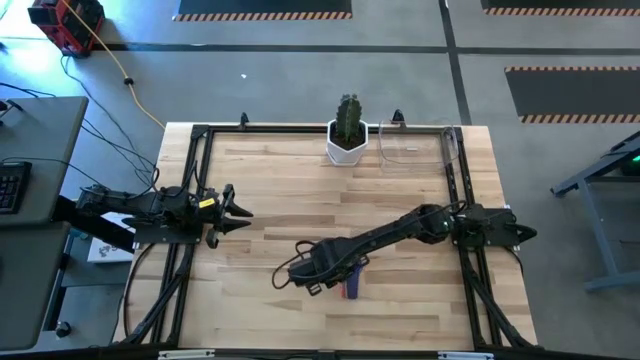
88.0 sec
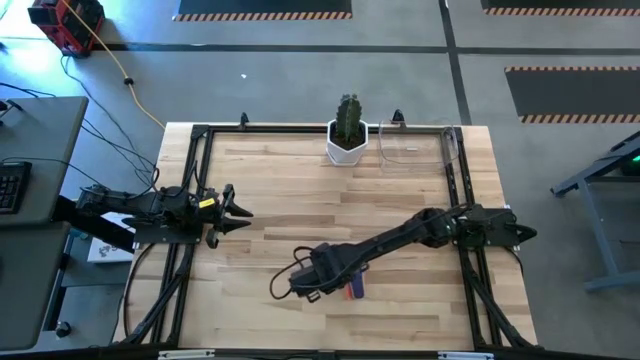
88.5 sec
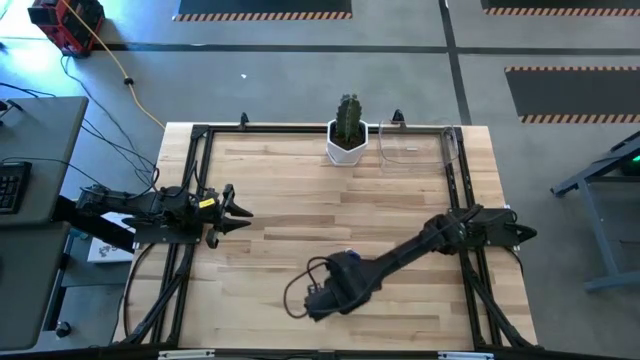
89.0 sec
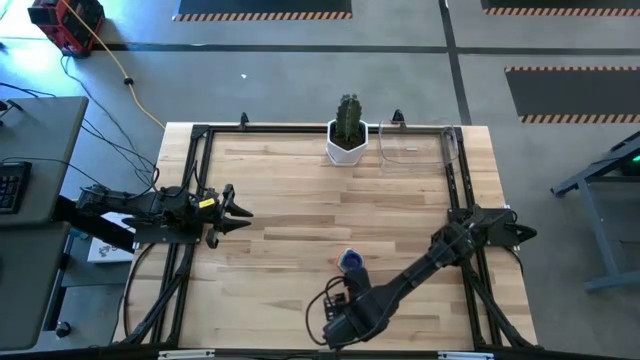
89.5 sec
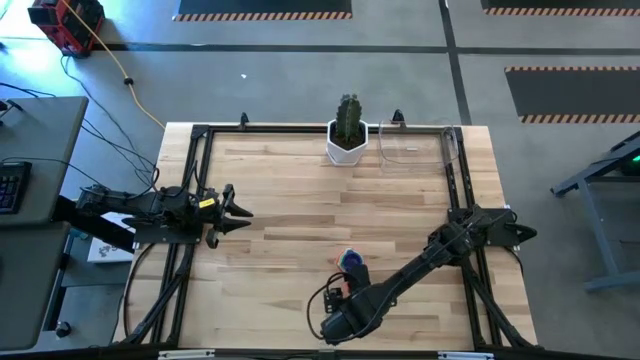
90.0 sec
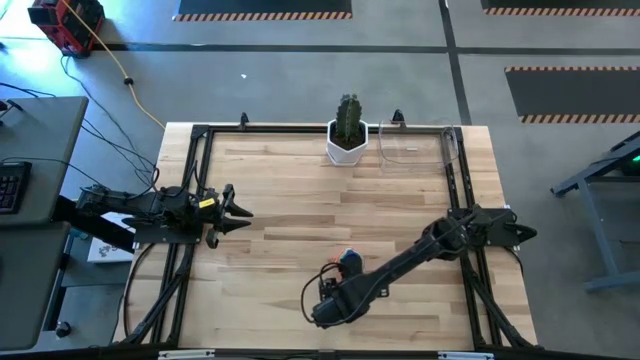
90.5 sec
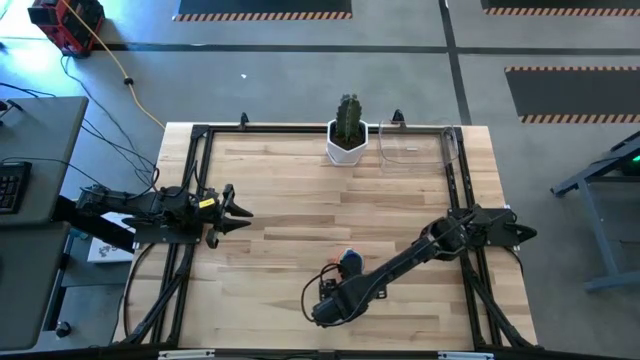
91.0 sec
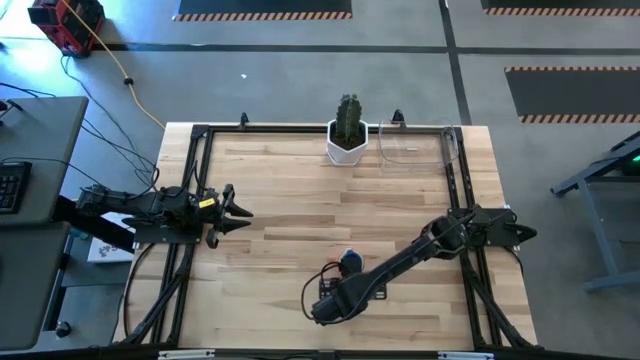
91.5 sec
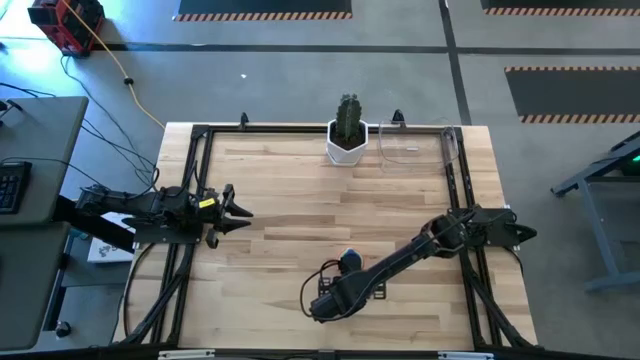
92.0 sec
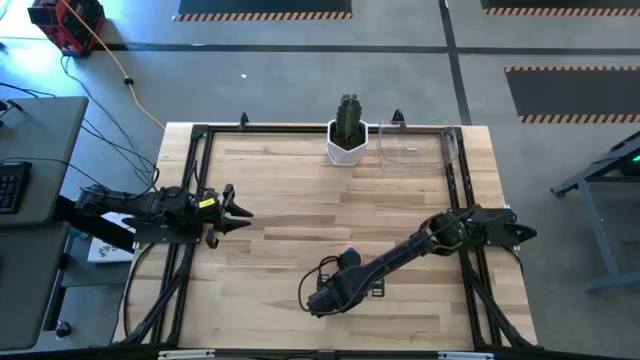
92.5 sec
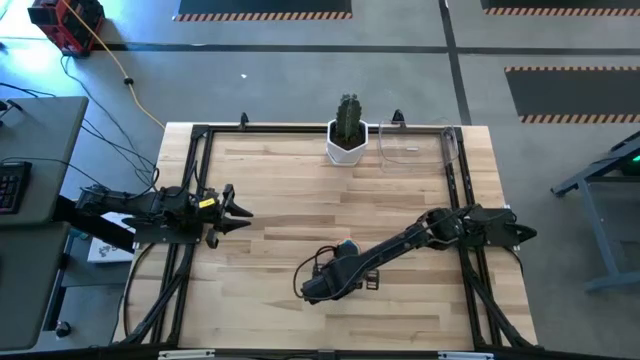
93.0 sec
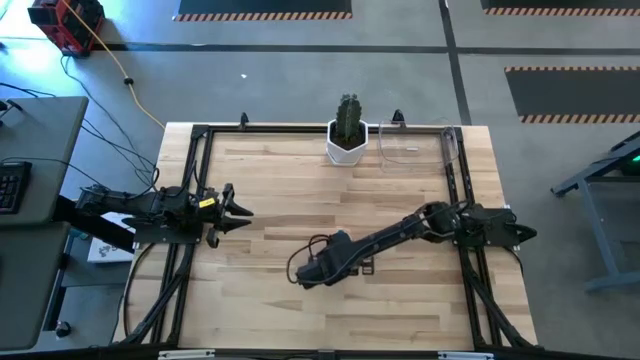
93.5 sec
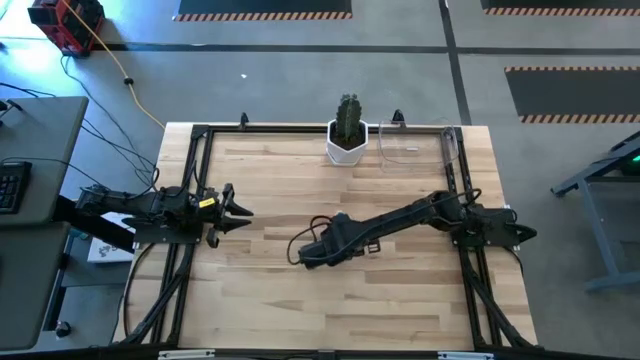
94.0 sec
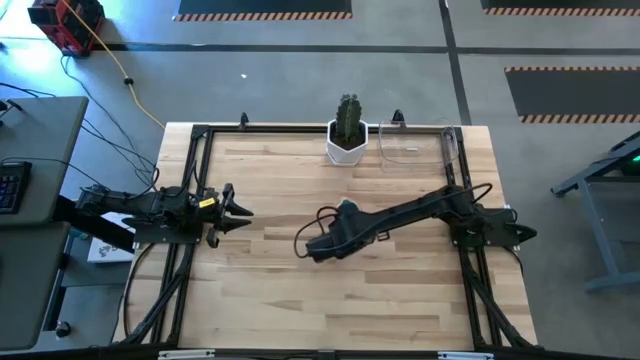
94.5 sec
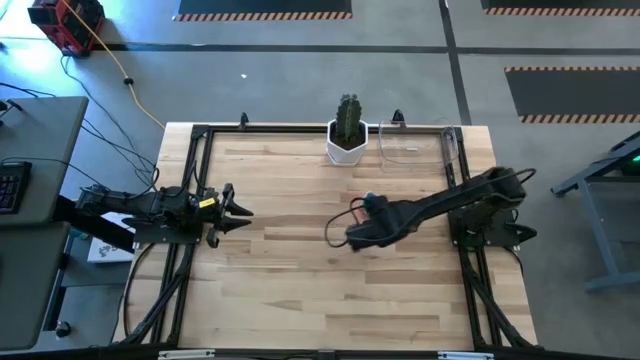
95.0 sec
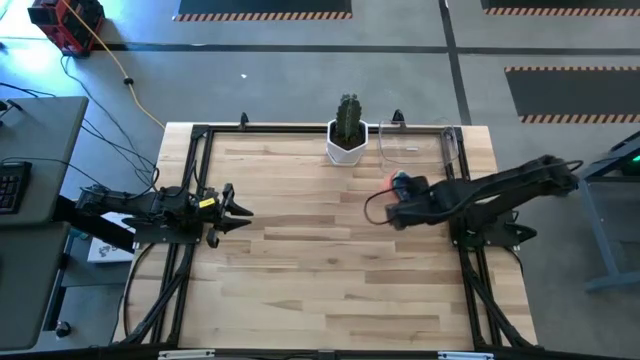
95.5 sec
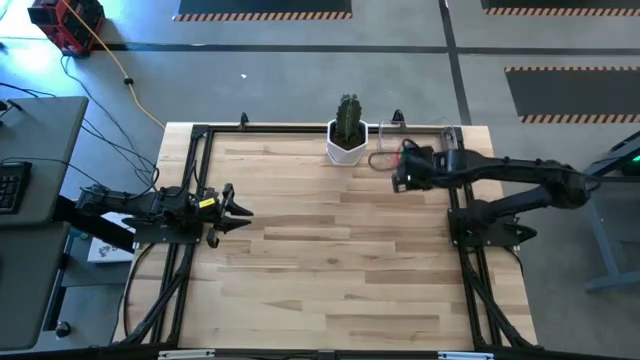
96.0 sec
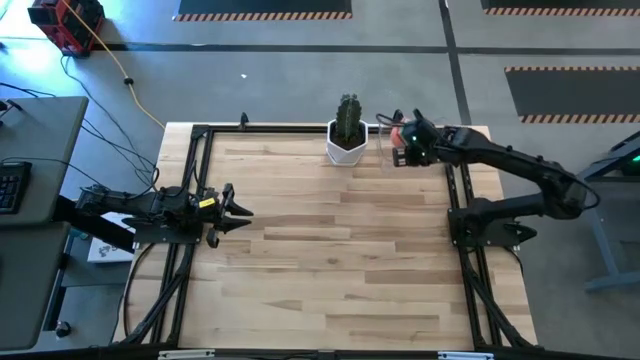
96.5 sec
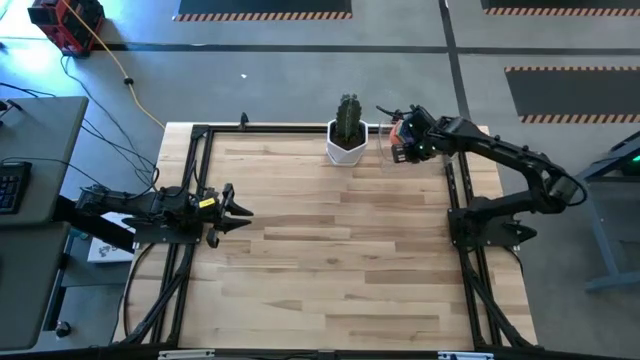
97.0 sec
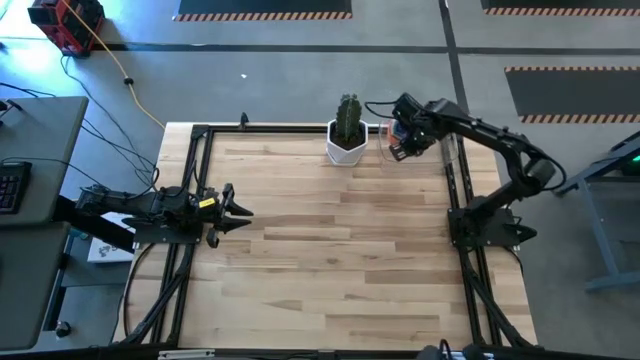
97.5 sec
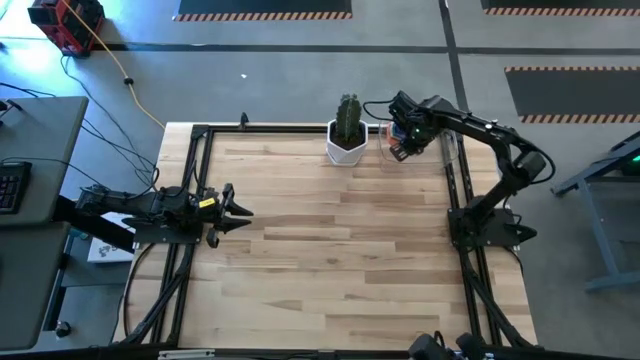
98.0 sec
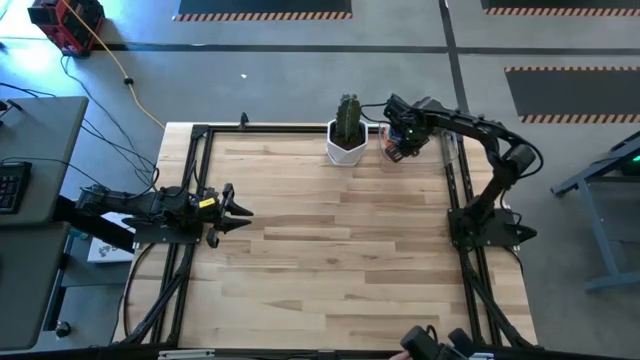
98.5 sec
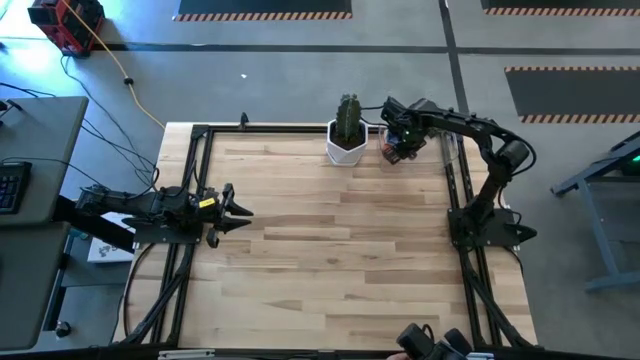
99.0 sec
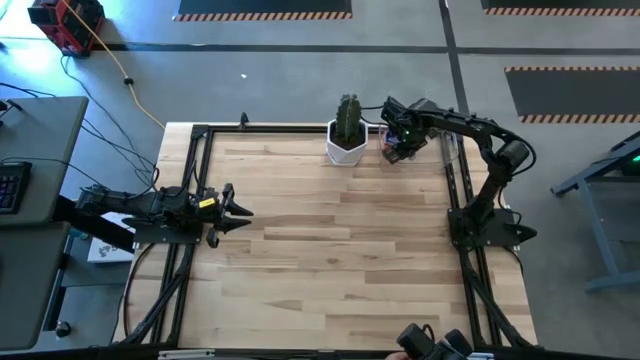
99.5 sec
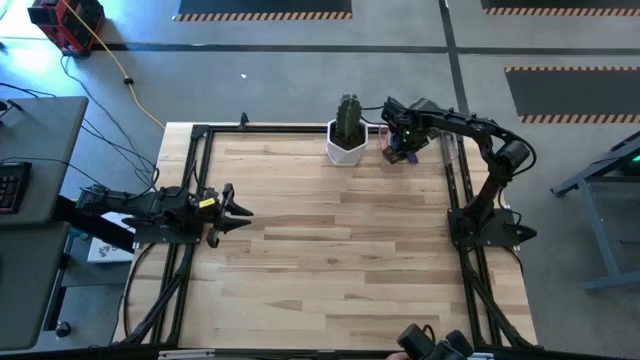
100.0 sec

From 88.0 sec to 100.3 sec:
Task: Nest measuring cups in basket
Put the measuring cups into the transparent bin

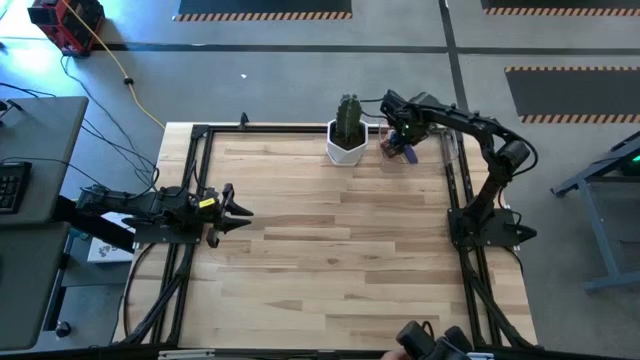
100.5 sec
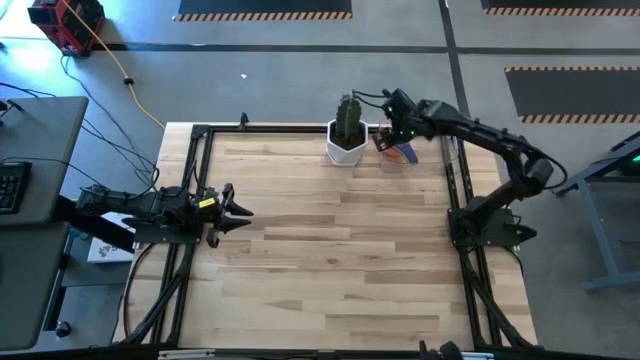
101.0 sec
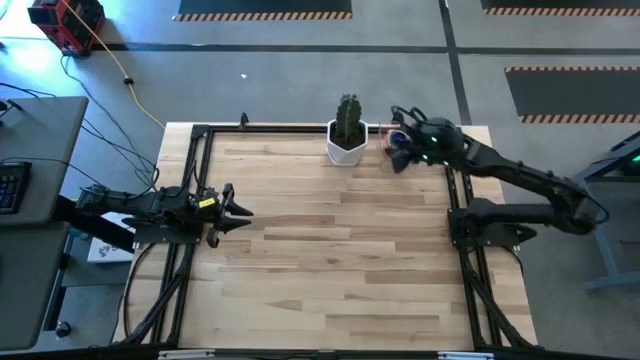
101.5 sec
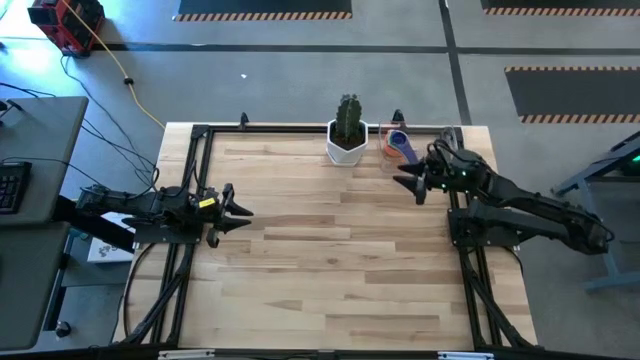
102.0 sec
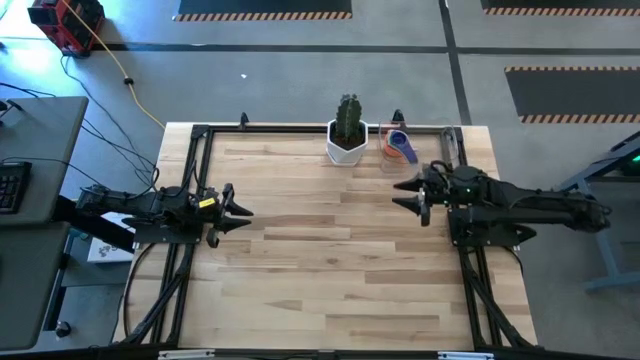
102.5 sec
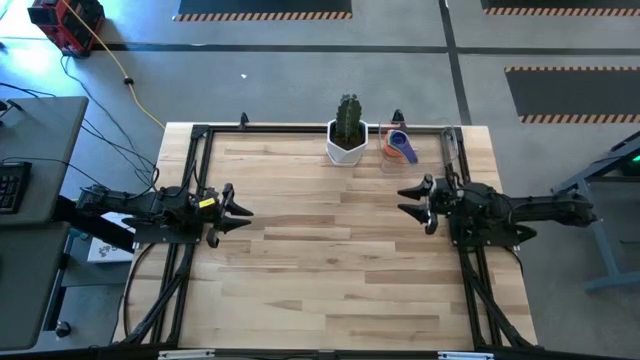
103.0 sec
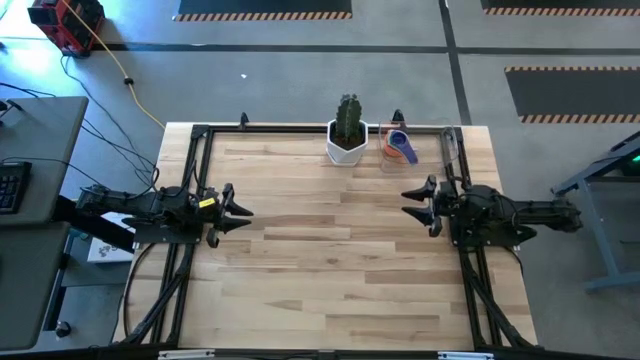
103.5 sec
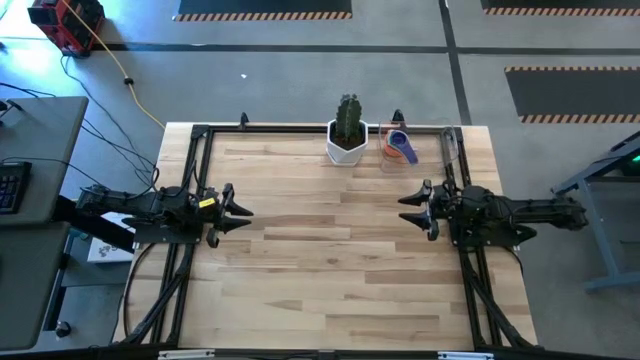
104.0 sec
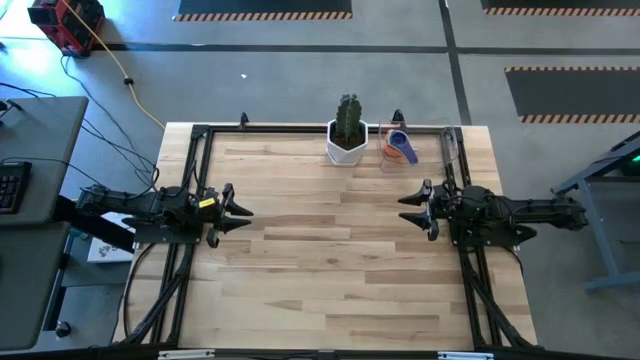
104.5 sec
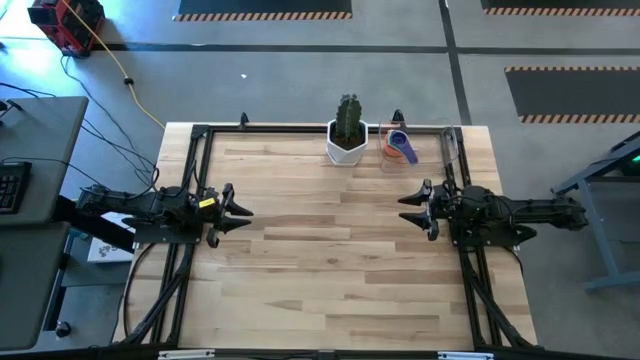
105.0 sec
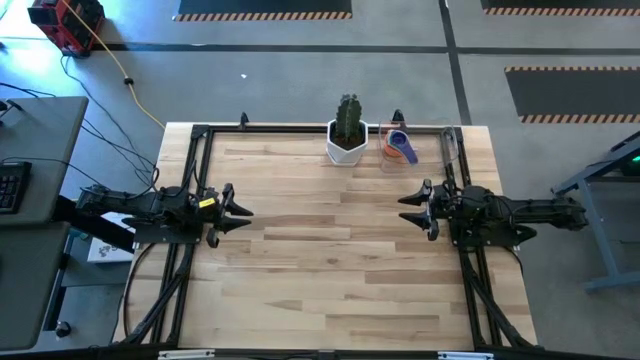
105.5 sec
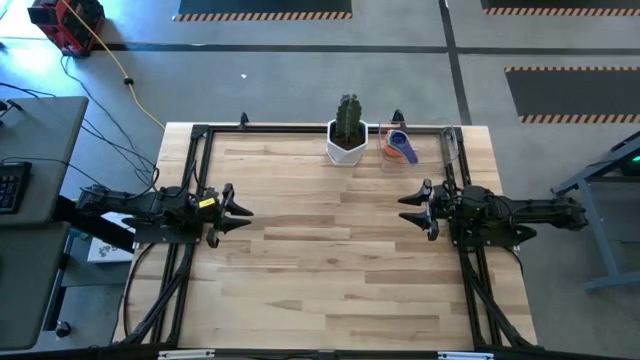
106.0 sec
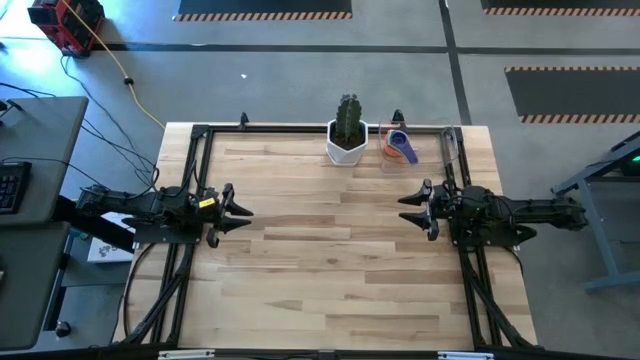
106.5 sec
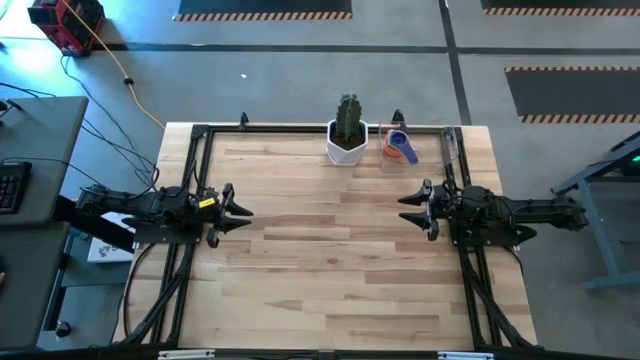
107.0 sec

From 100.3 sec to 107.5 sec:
Return to Home Position

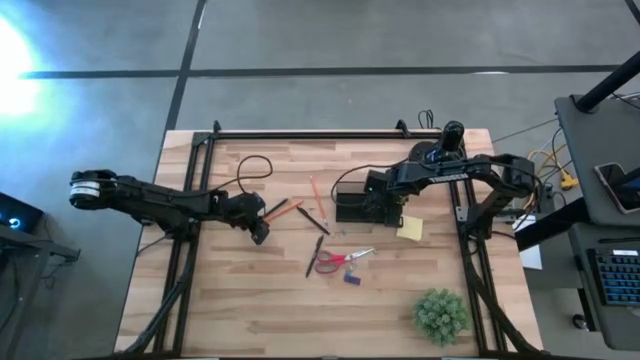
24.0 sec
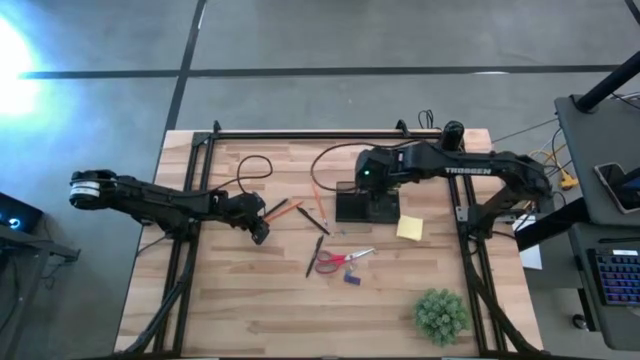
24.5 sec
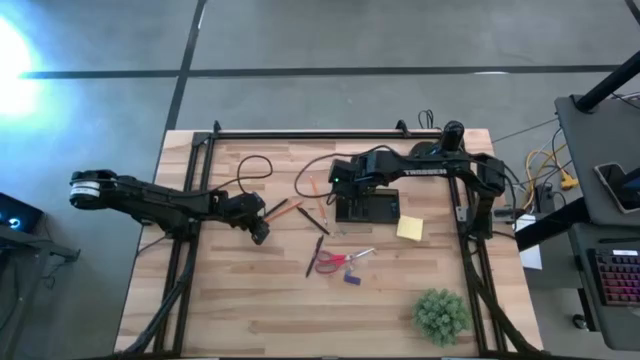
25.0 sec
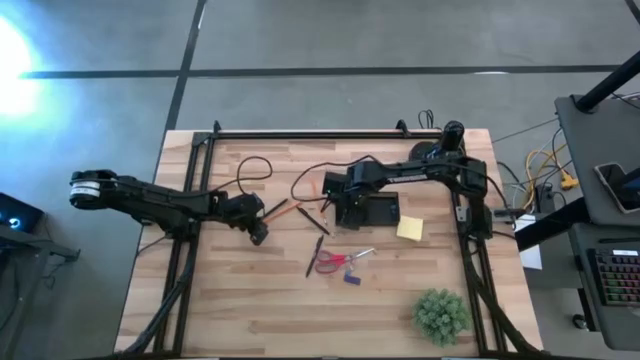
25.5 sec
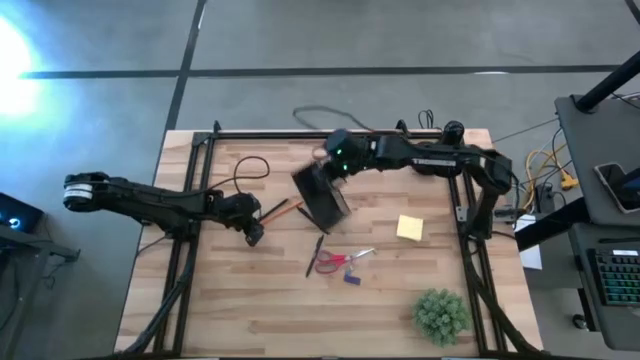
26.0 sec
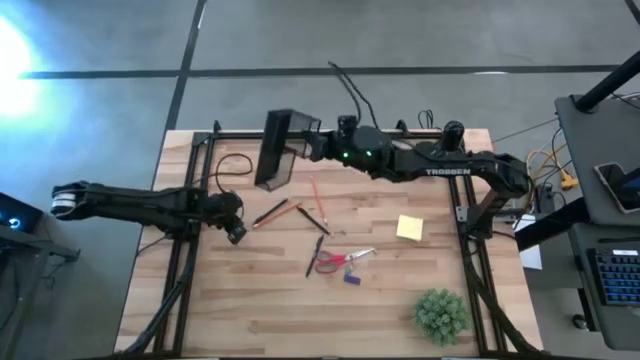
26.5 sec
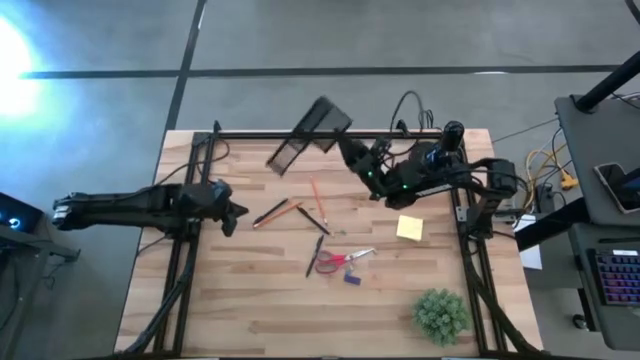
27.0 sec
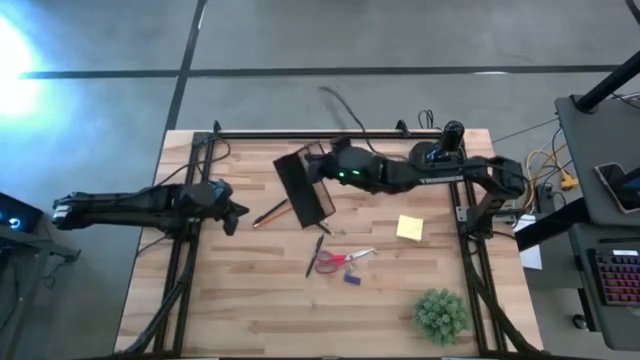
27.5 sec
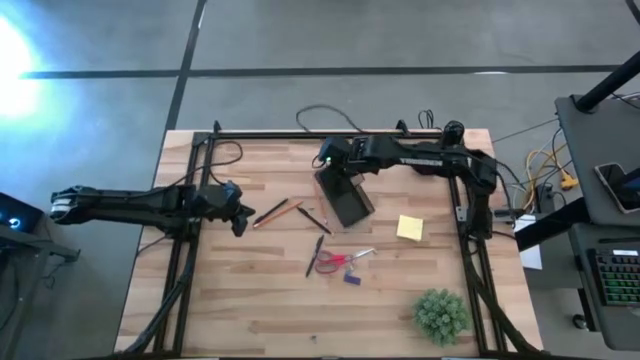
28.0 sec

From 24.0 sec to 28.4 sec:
Task: Pick and place office supplies into organizer
Remove the blue binder clip from the desk organizer
